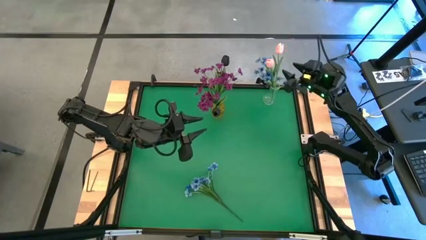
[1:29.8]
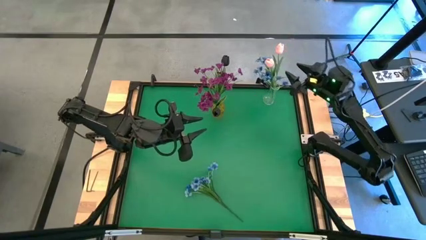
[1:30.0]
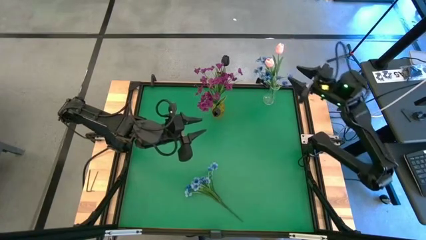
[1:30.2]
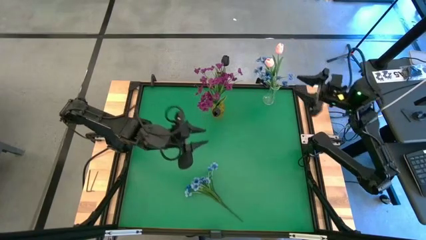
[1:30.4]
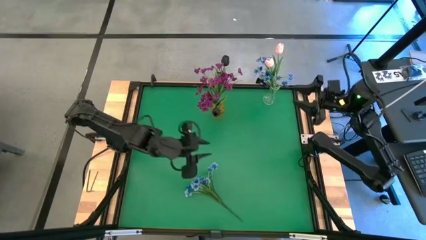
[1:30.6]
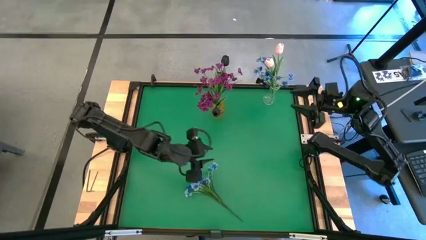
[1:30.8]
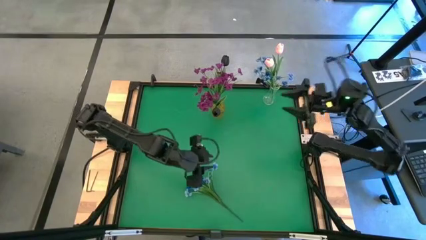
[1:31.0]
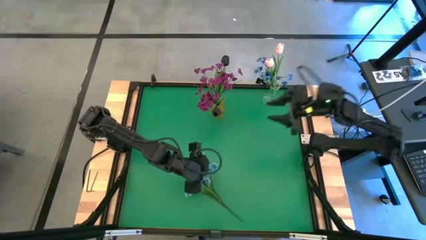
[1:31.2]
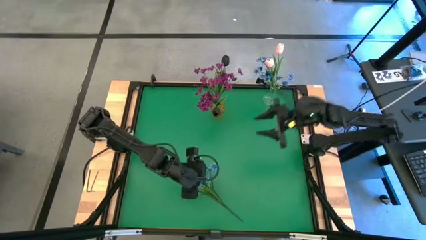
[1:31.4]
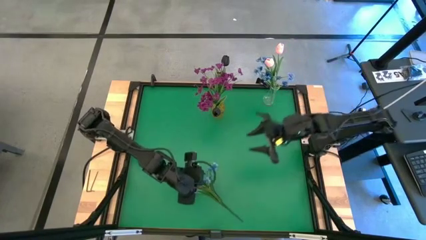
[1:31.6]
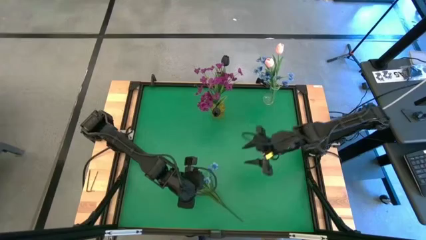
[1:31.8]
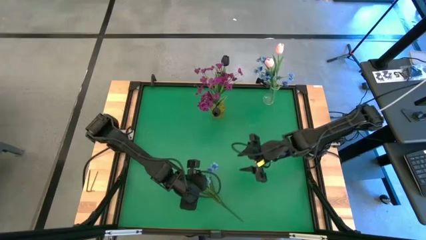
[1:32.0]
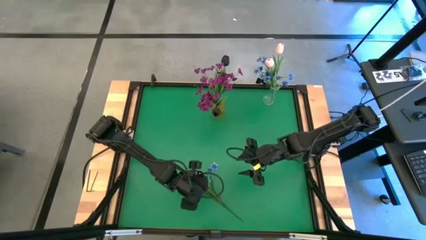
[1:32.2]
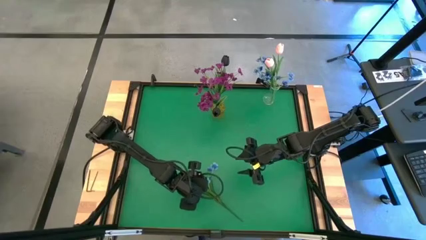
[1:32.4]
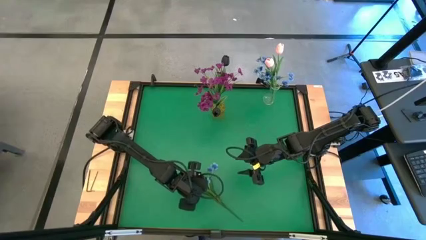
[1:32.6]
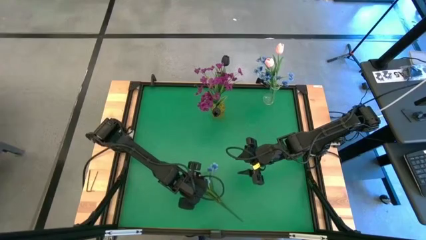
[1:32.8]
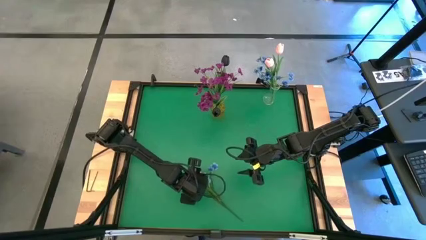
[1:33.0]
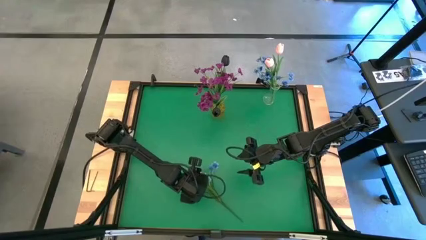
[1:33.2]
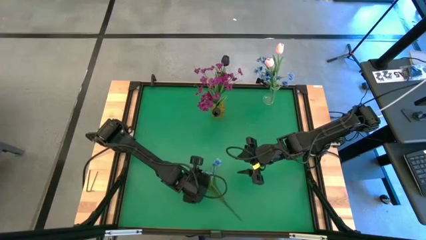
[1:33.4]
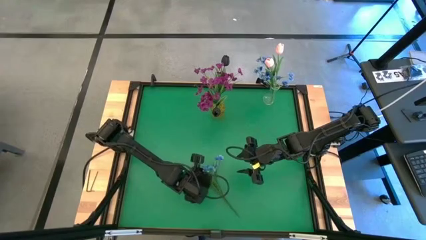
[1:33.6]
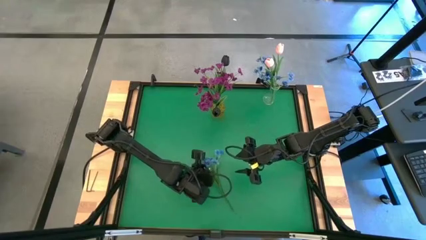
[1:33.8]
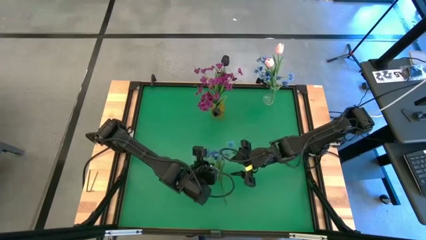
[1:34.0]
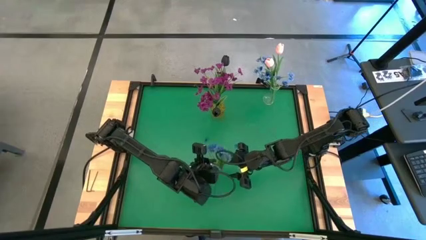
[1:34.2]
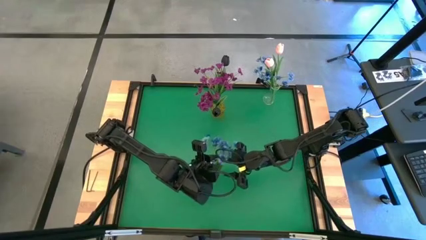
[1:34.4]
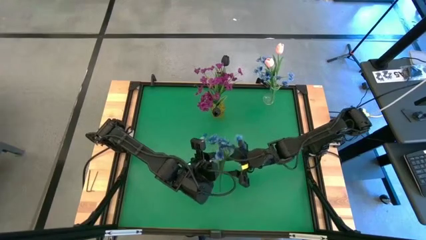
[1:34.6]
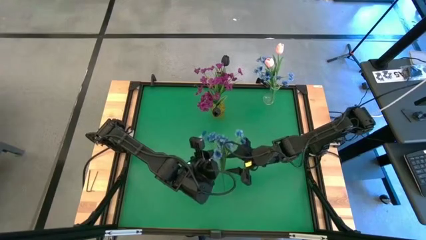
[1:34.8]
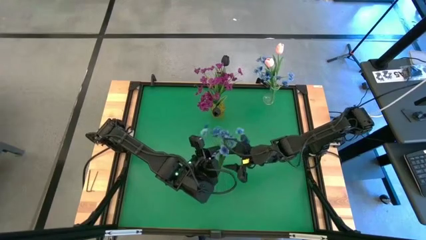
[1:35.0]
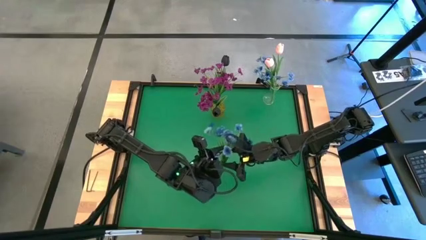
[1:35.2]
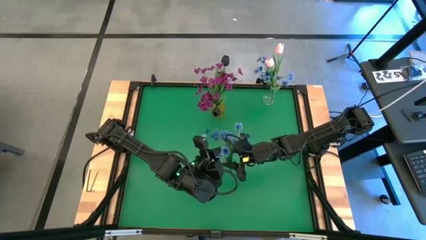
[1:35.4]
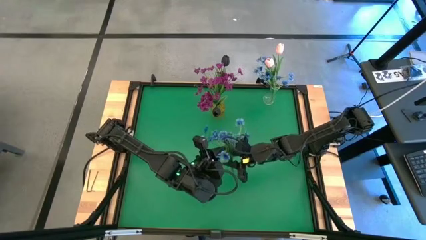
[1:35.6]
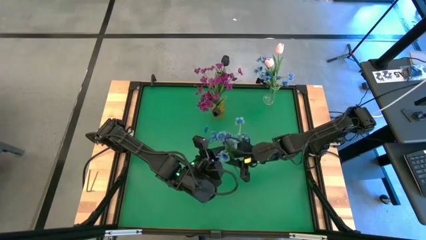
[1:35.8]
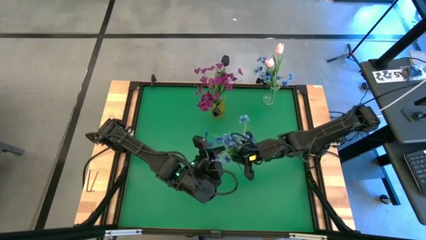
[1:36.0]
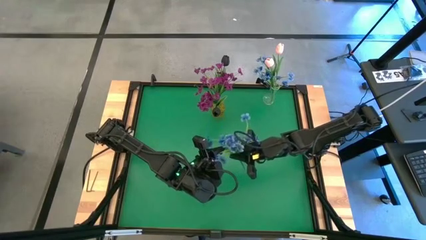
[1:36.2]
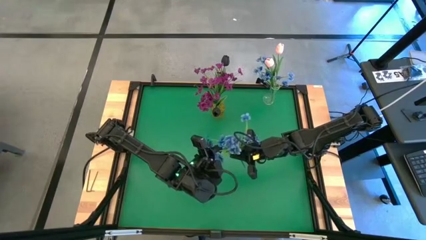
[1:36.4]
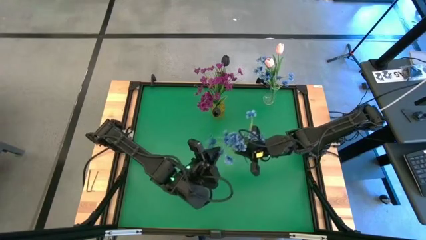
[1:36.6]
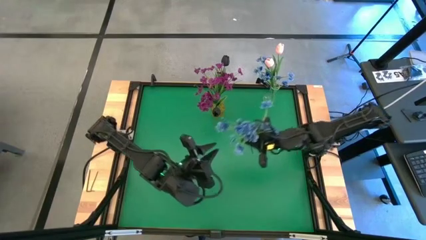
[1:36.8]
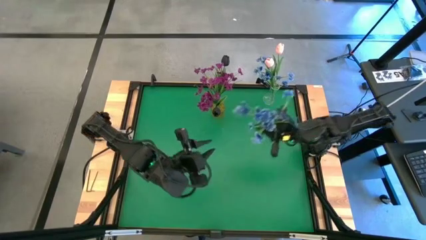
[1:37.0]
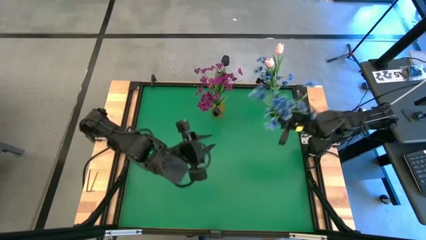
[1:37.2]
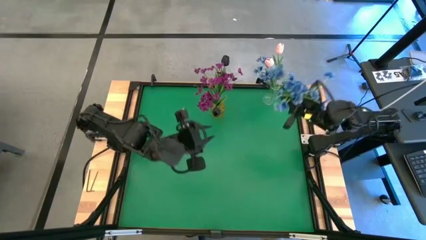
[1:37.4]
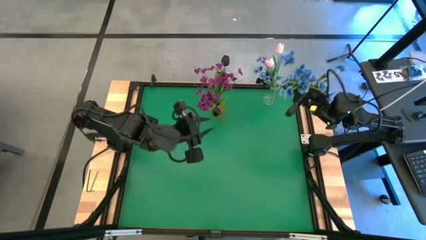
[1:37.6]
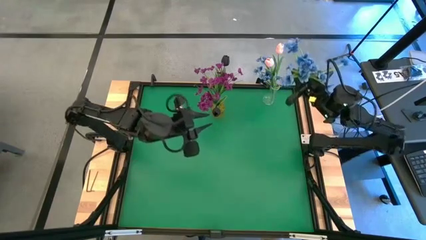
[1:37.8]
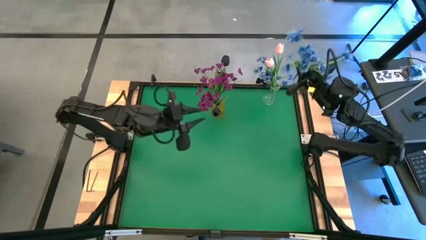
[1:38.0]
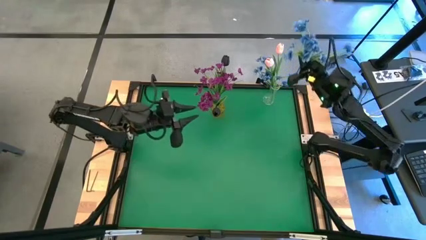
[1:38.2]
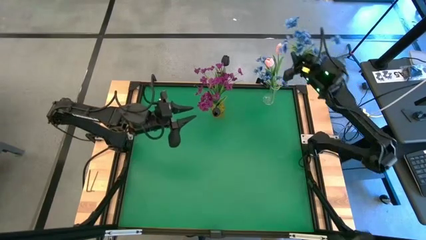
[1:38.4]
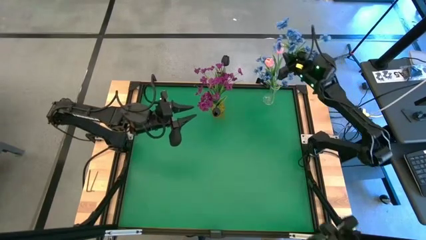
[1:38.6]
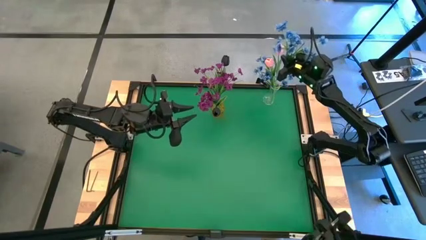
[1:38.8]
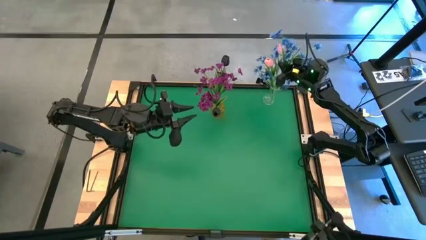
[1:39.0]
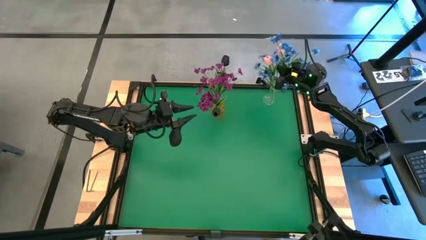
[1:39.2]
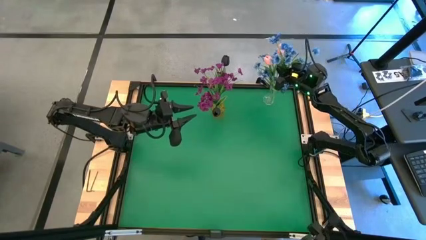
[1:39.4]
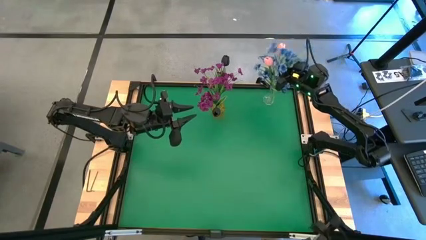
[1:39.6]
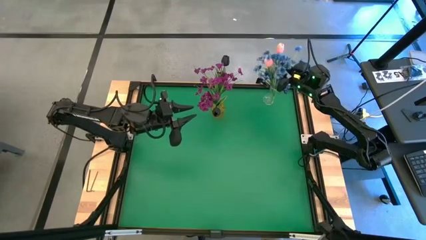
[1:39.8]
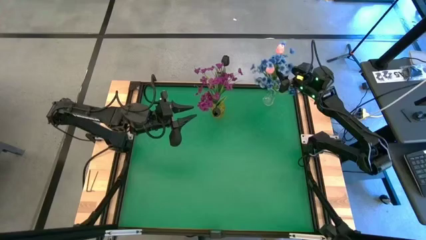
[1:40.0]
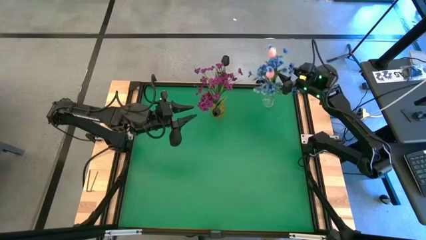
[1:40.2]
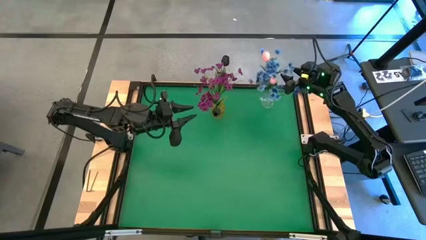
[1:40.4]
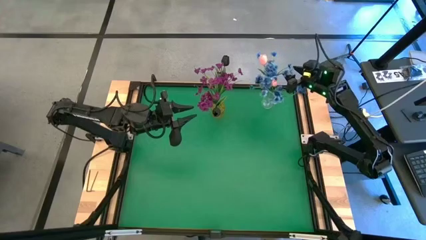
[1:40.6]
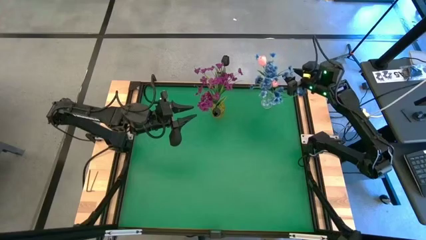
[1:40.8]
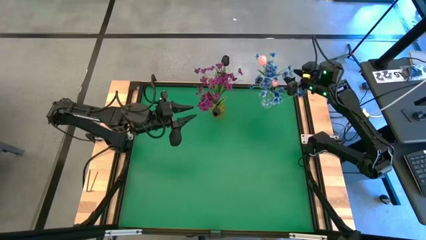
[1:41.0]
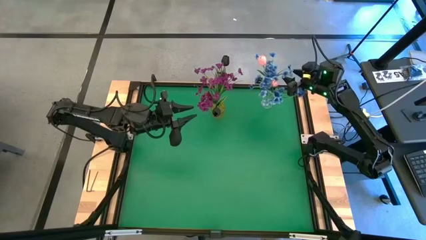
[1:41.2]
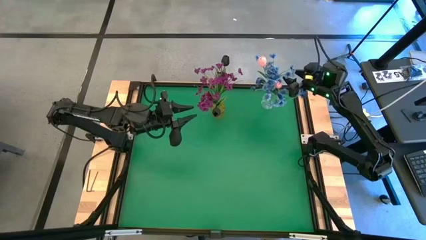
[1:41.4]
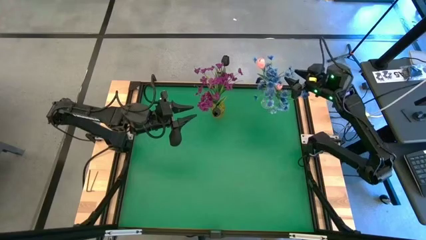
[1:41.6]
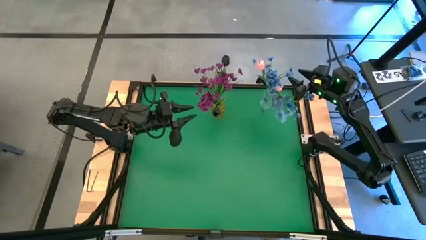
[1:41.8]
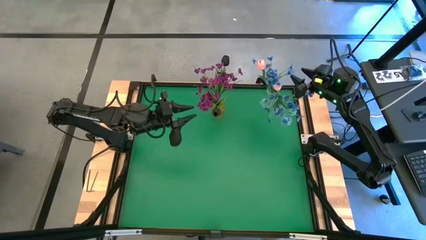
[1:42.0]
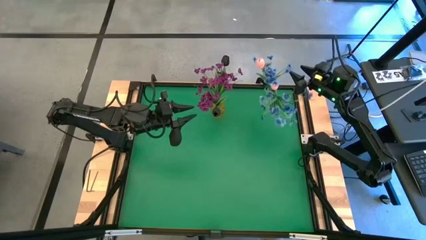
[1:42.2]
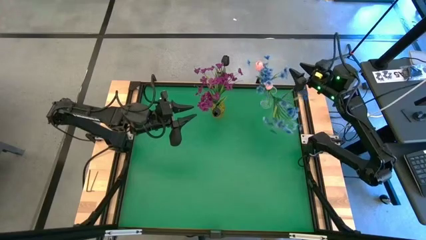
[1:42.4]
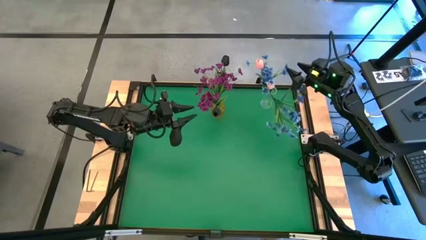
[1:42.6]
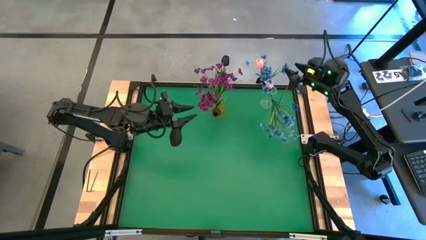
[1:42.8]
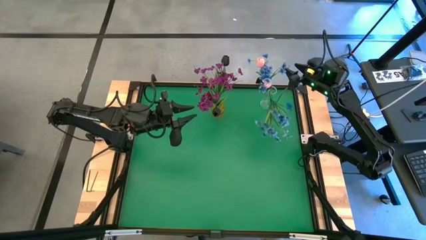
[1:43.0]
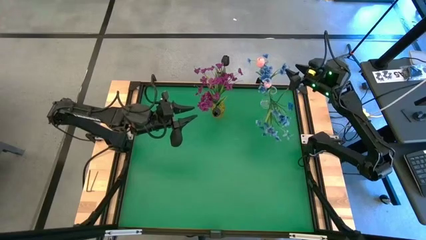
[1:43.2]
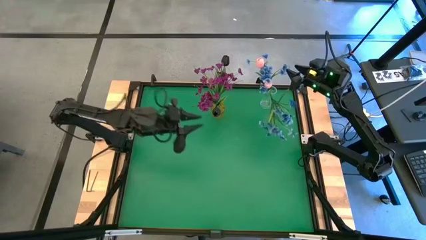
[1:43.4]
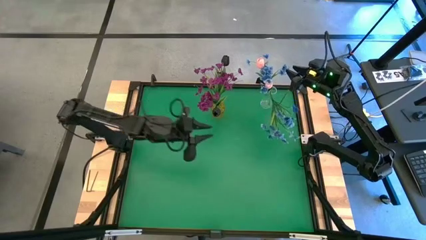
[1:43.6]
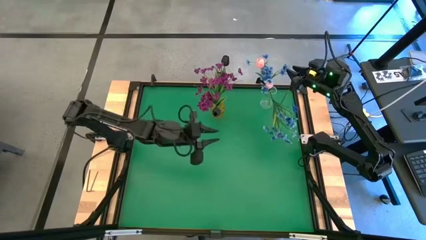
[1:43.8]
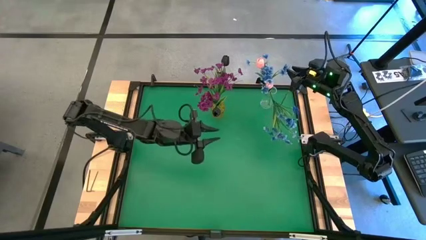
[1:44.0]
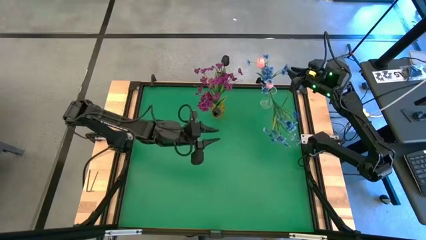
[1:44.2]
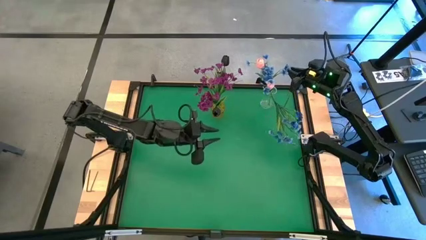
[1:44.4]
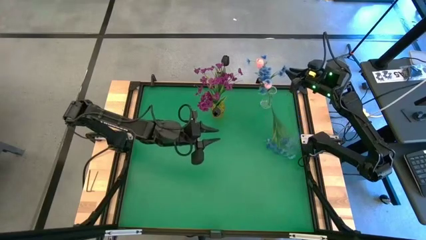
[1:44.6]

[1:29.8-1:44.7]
Task: Sort flowers into vase by color
Put the blue flowers into the transparent vase

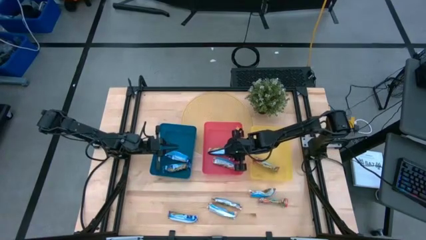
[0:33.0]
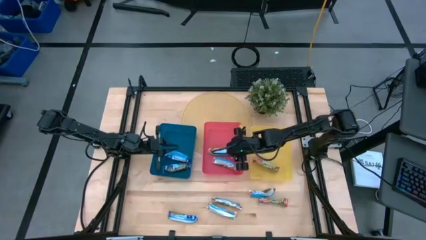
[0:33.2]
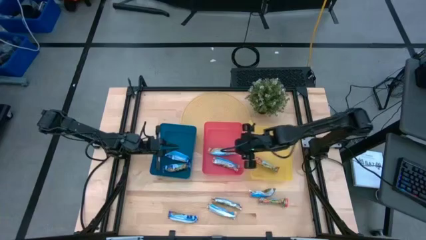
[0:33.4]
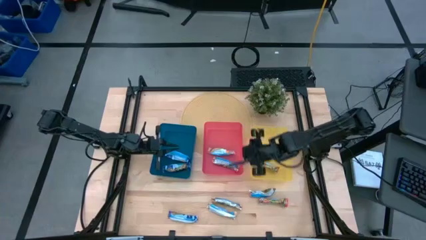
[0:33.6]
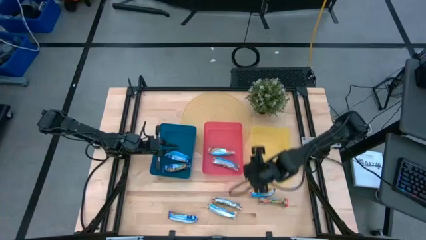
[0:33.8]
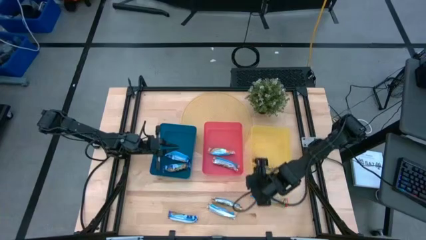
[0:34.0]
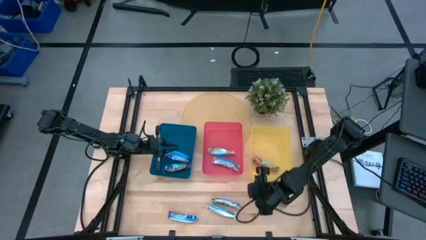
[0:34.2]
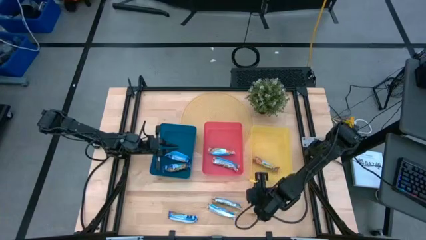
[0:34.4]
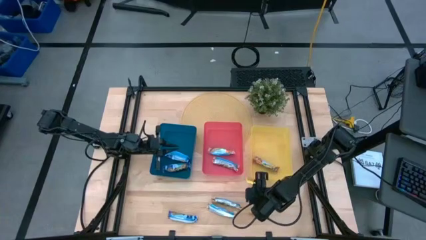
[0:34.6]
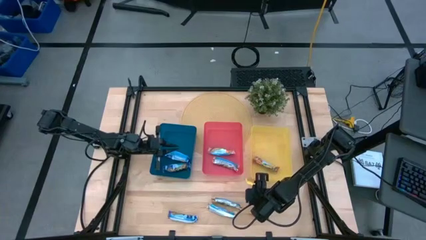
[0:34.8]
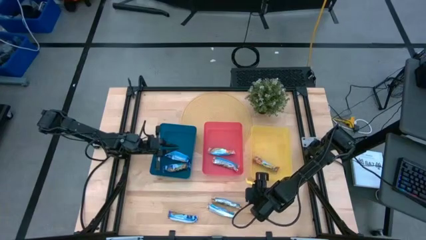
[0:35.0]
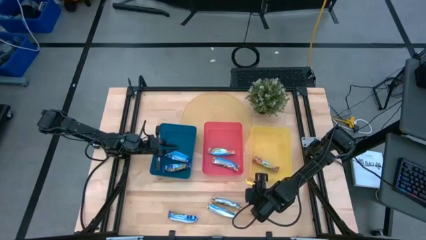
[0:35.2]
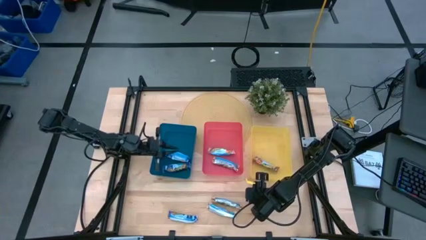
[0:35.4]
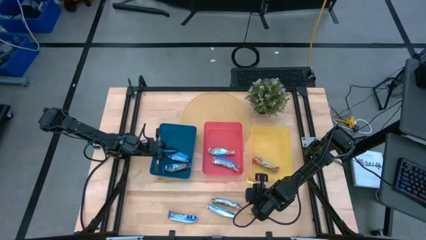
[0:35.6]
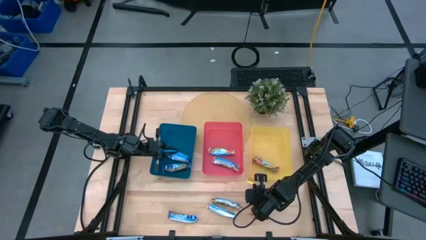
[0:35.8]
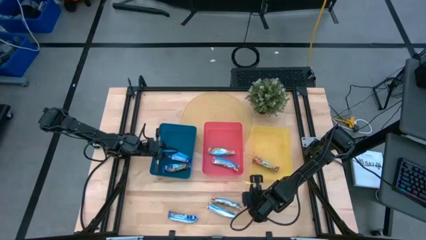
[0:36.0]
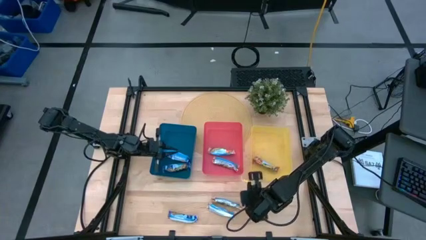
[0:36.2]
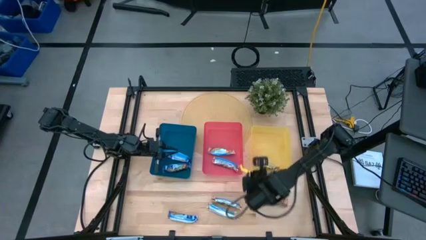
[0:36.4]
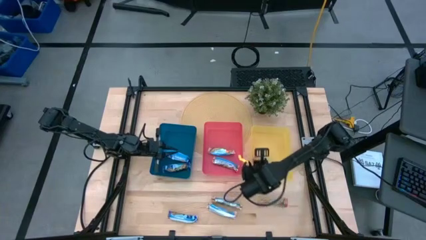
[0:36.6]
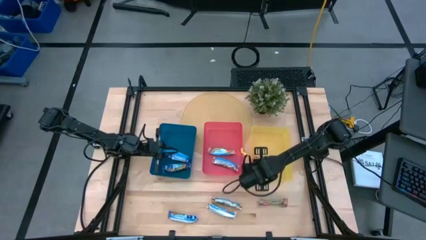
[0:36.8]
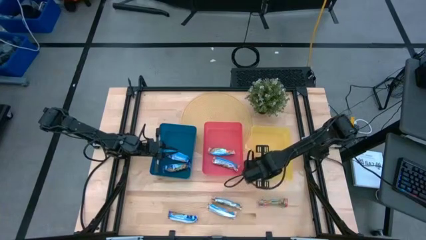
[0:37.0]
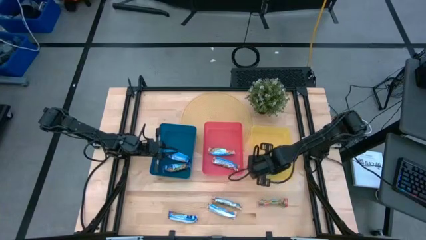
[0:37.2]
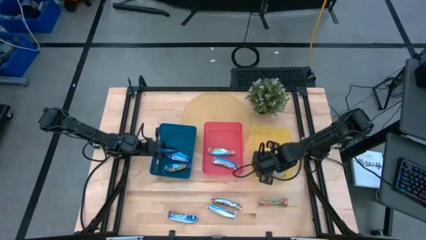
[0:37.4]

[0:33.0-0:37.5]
Task: Pick and place Granola Bars by type
Put the red granola bar into the yellow bin
